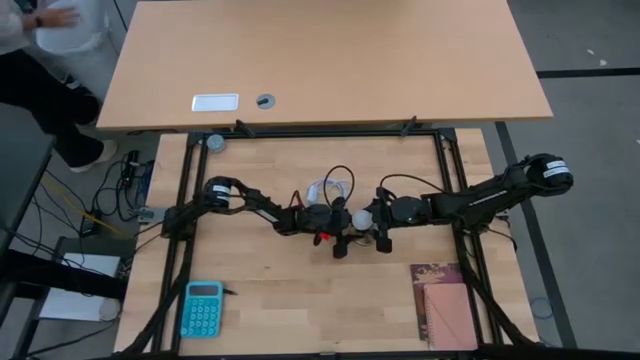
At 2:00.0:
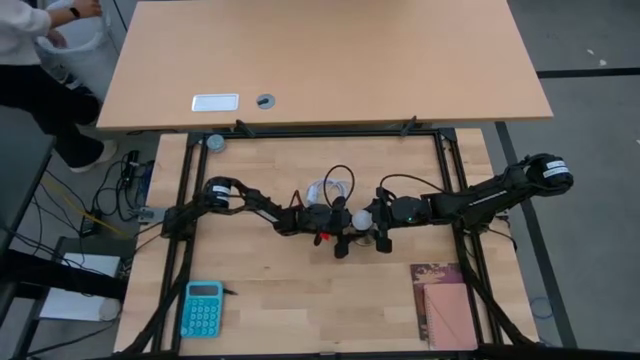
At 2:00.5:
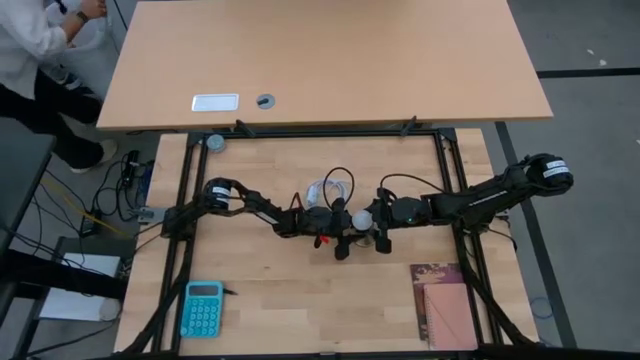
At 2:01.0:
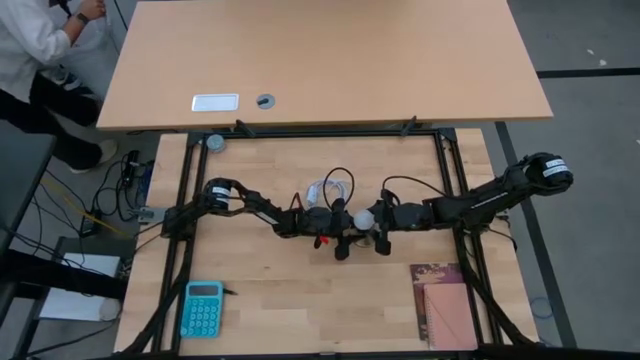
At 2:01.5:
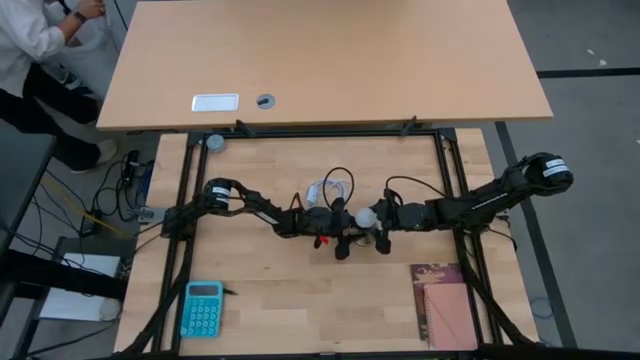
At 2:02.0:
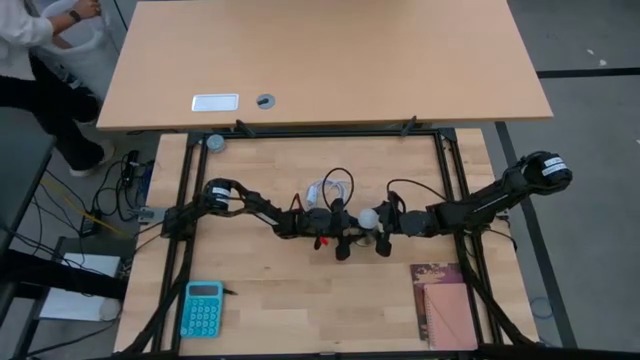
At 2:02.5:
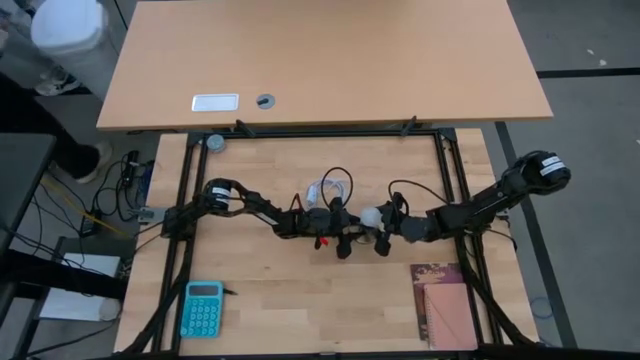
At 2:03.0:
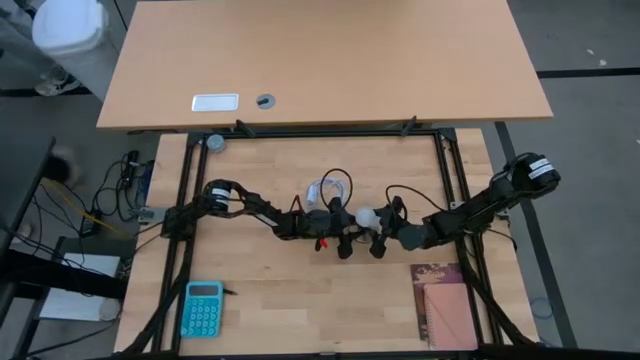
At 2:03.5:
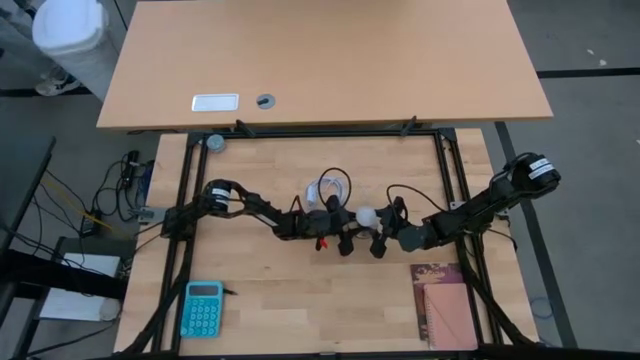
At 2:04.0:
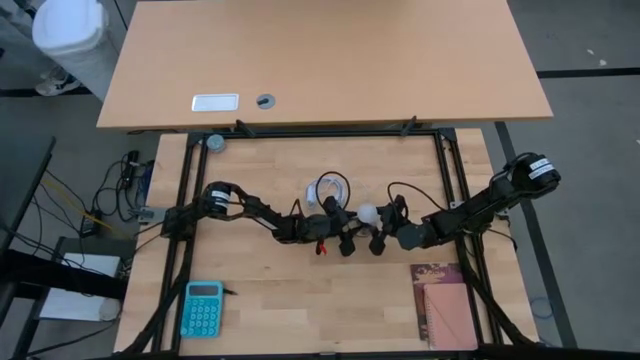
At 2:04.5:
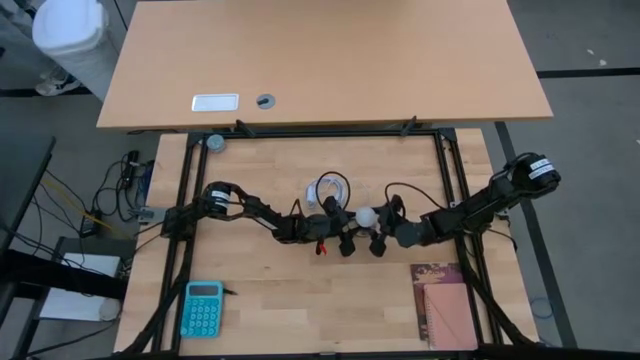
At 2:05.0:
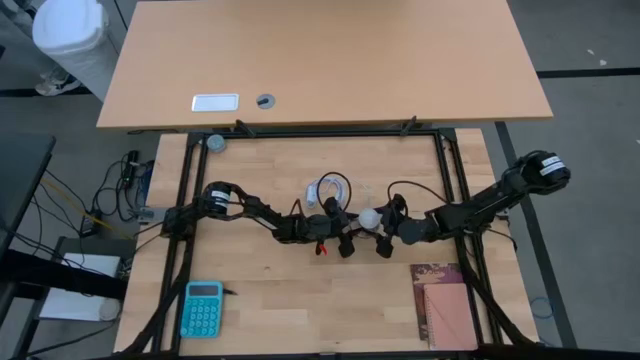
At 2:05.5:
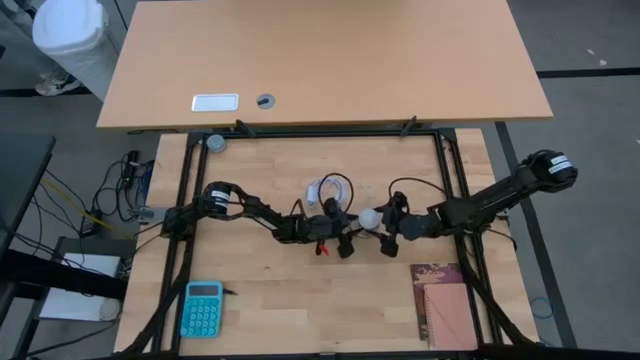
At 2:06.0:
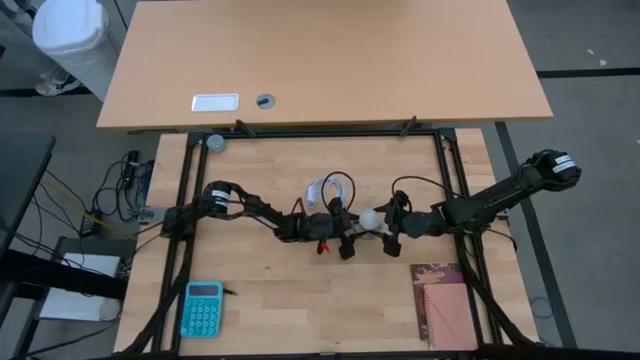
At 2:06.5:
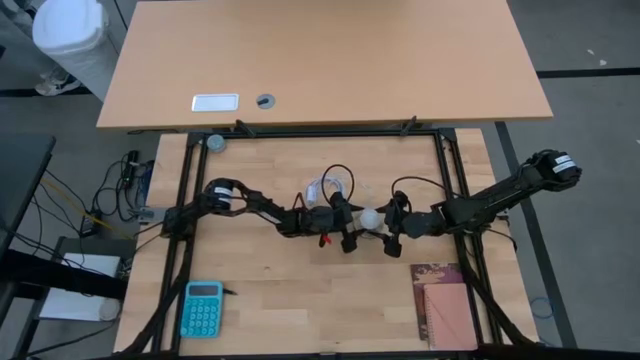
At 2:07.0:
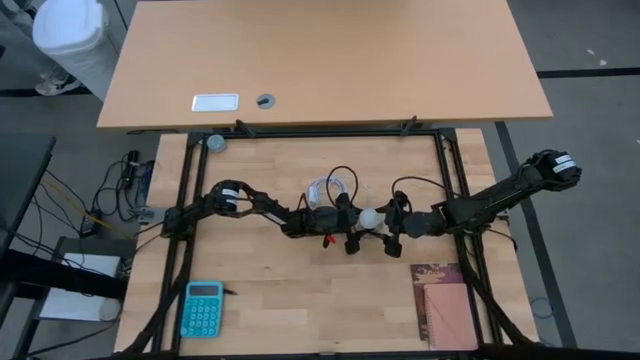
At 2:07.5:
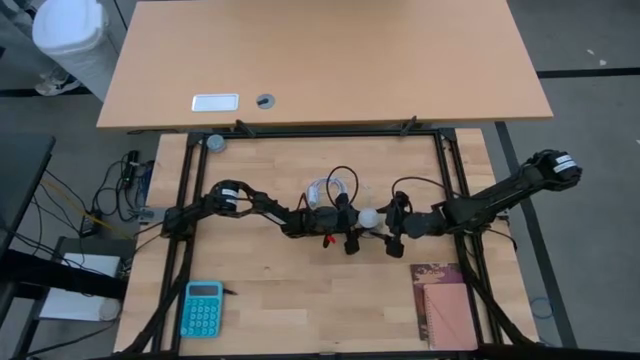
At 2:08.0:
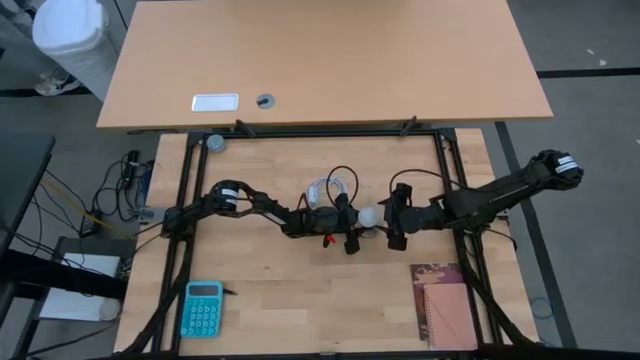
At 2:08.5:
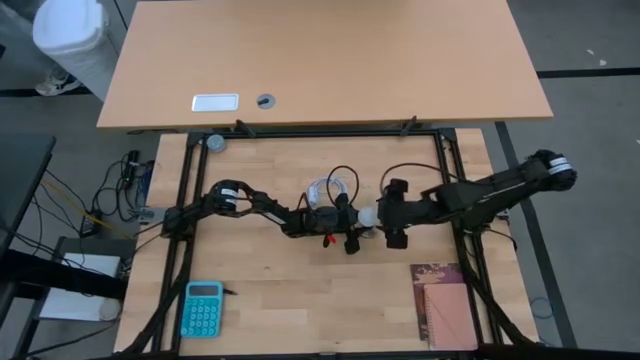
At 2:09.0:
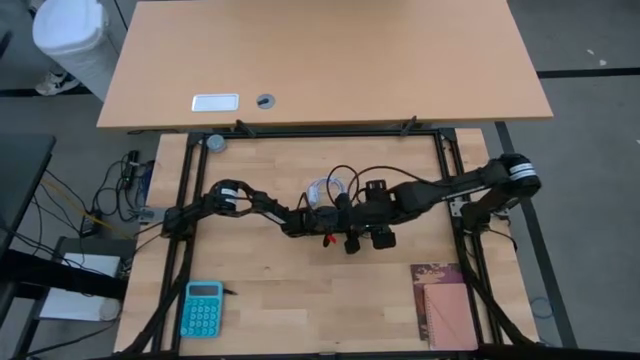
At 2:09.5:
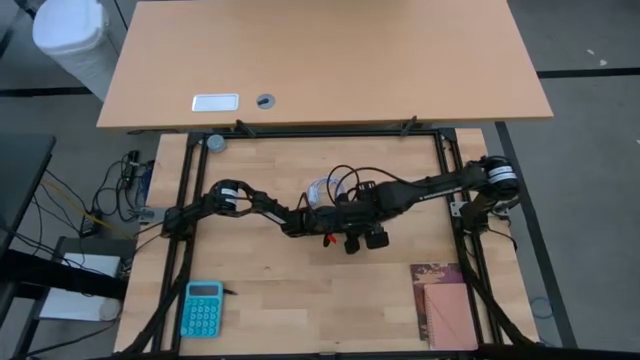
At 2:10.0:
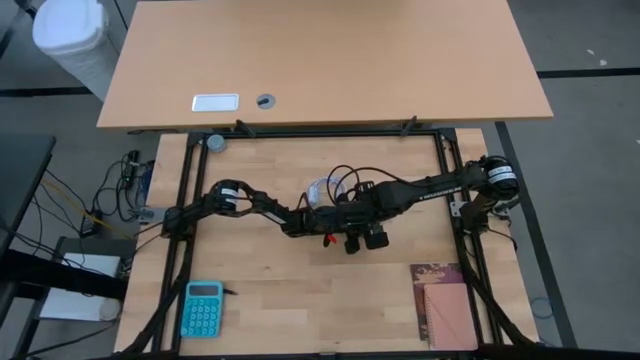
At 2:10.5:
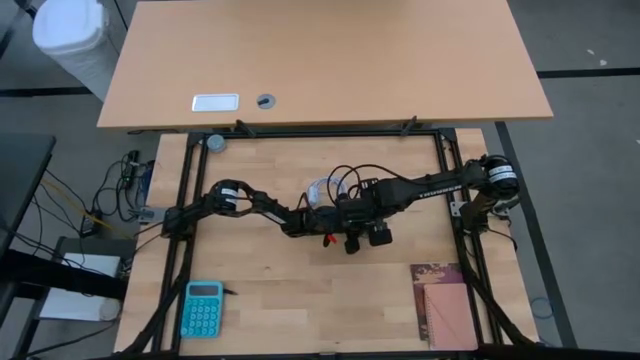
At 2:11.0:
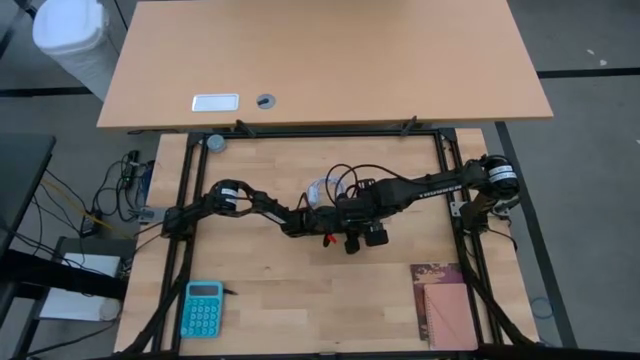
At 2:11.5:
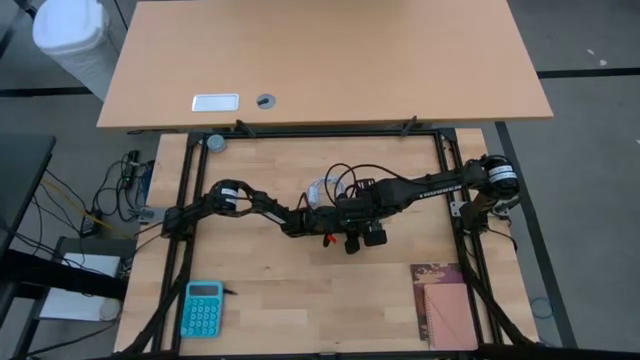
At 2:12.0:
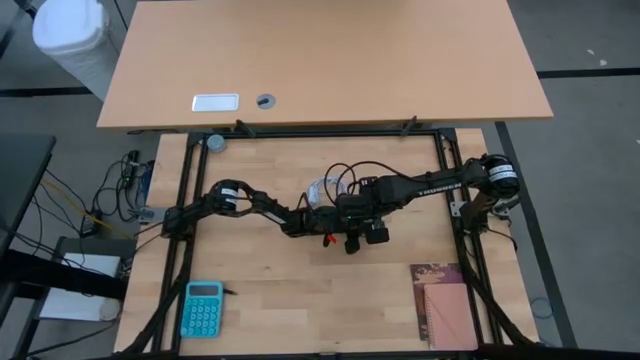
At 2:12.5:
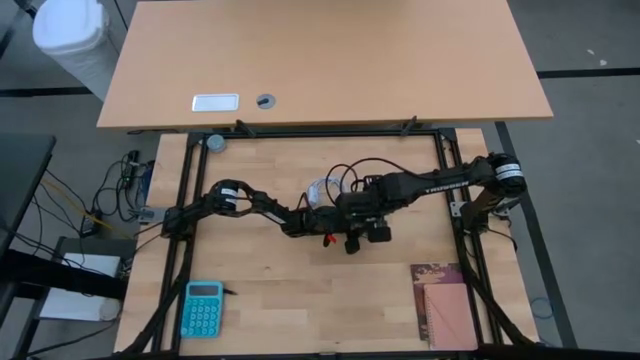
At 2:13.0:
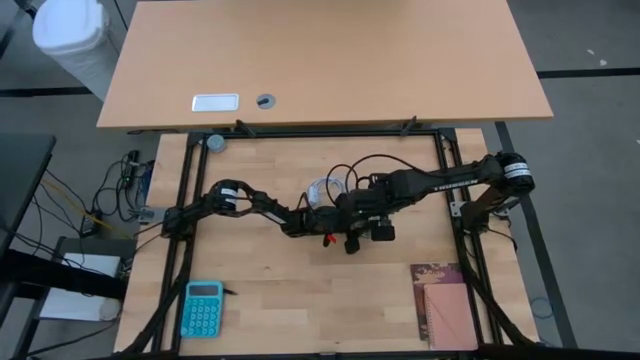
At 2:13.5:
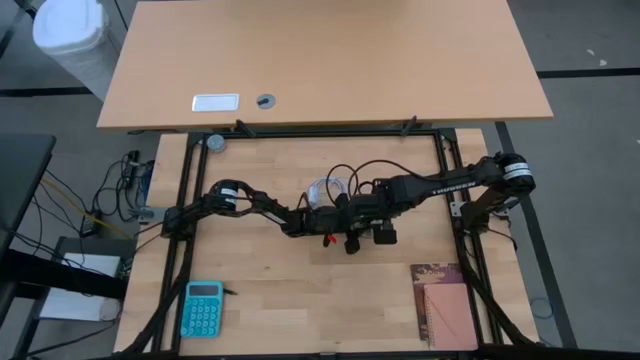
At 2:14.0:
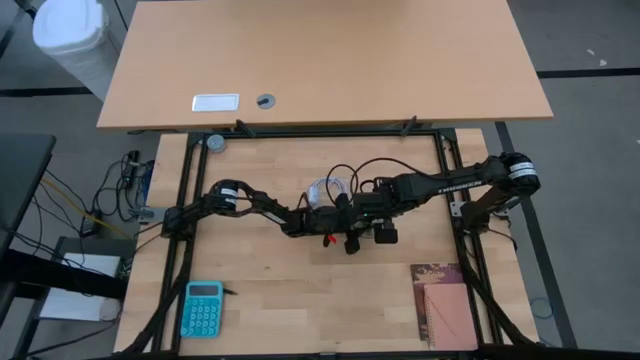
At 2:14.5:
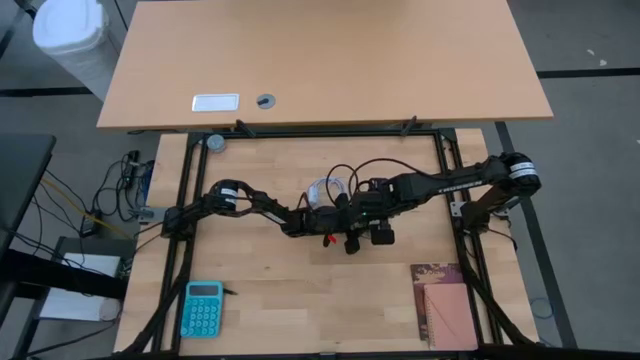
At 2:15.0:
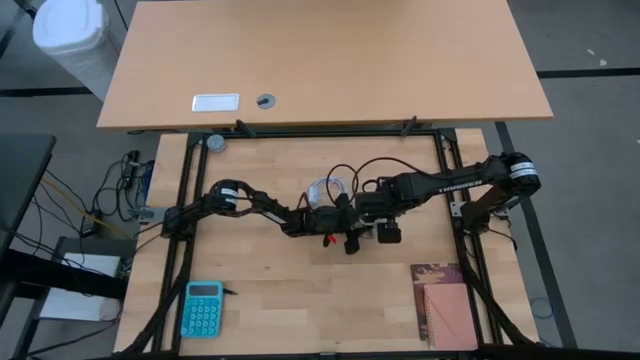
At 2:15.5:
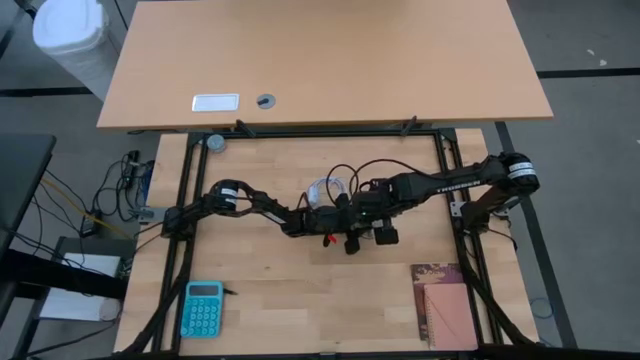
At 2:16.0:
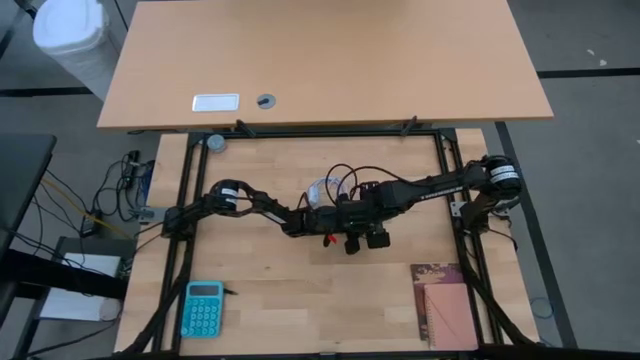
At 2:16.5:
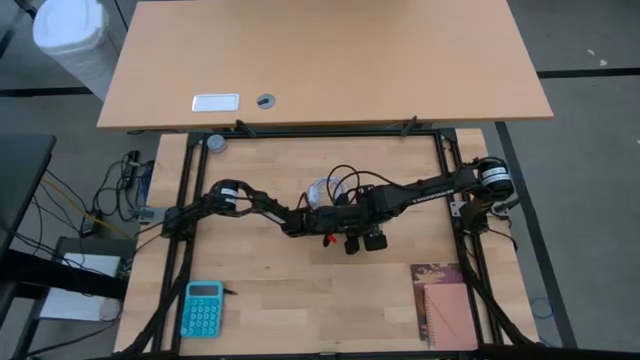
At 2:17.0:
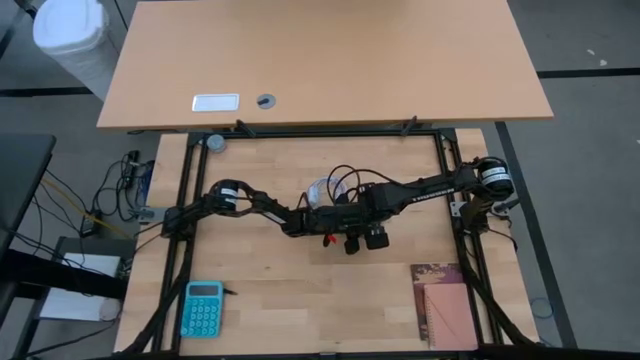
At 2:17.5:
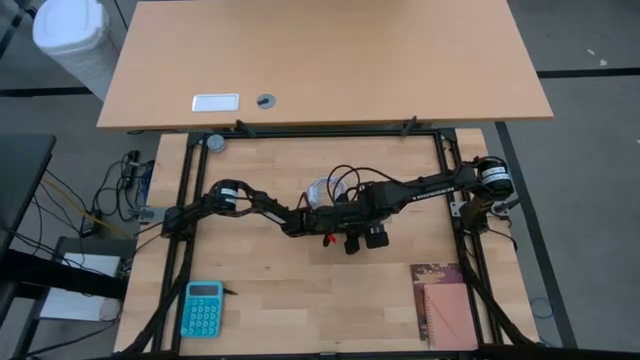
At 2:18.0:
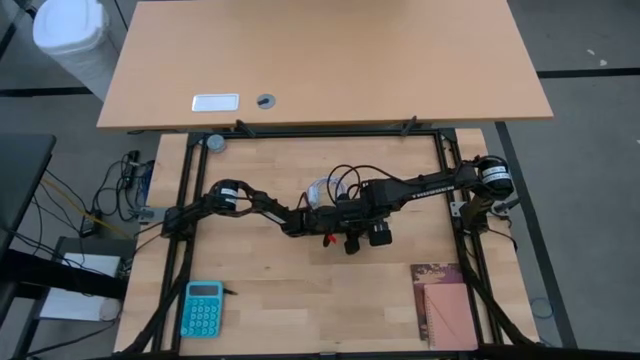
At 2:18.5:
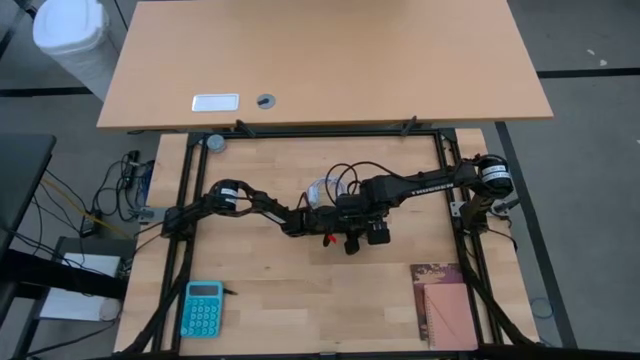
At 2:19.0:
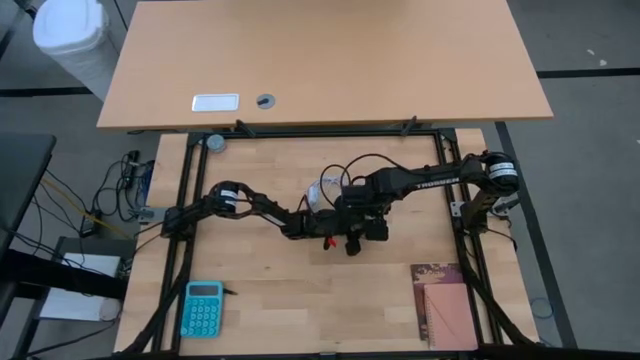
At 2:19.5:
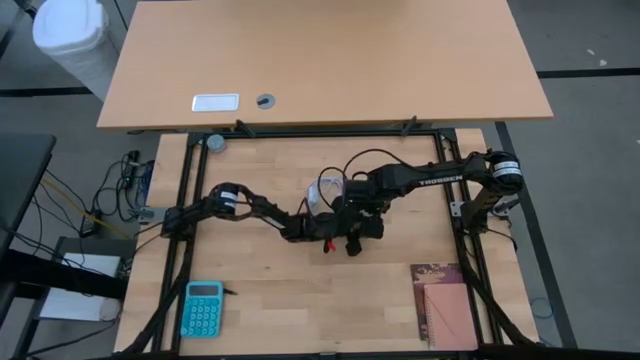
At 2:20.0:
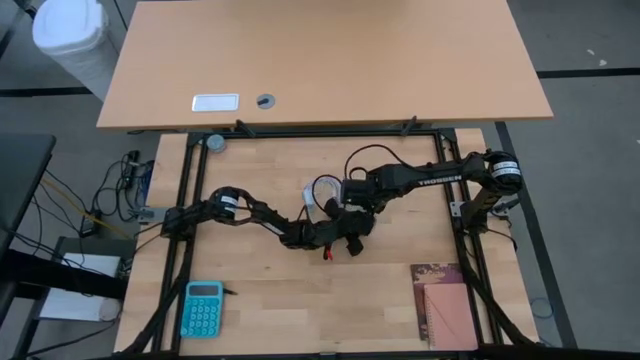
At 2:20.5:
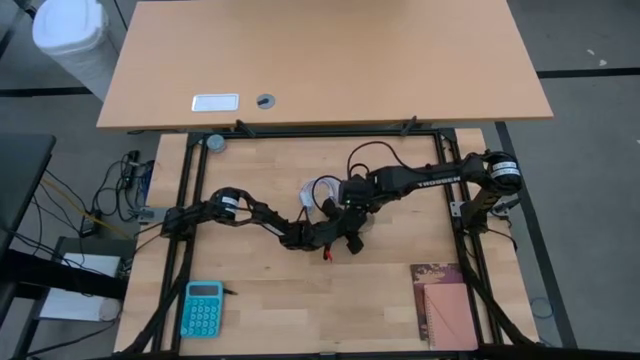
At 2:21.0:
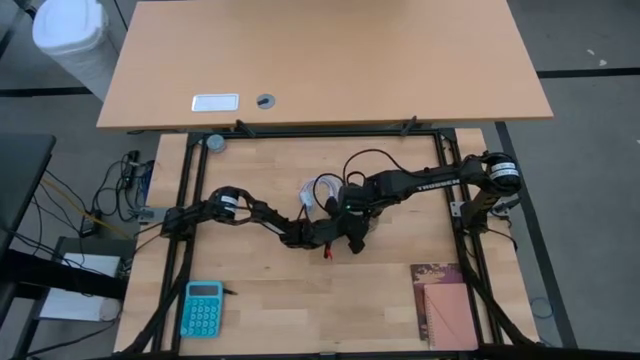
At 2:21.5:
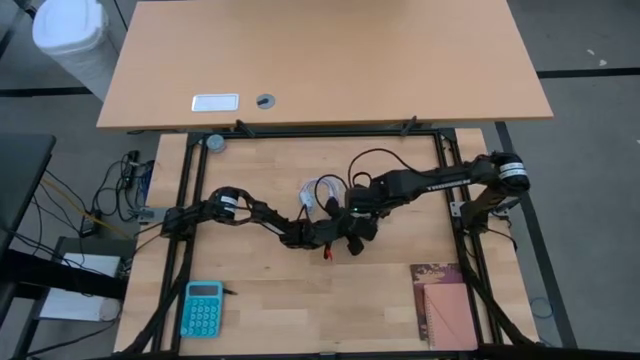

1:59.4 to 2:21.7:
Task: Screw lightbulb
Insert the white lightbulb into the lamp socket
